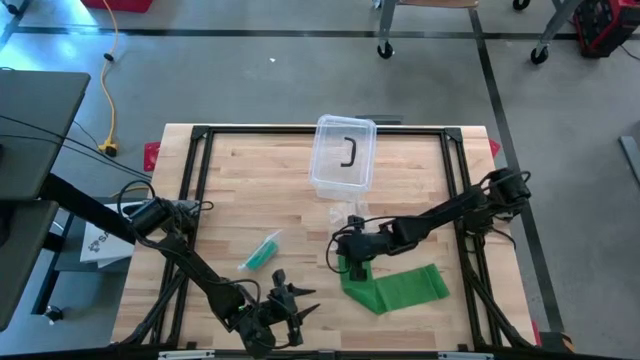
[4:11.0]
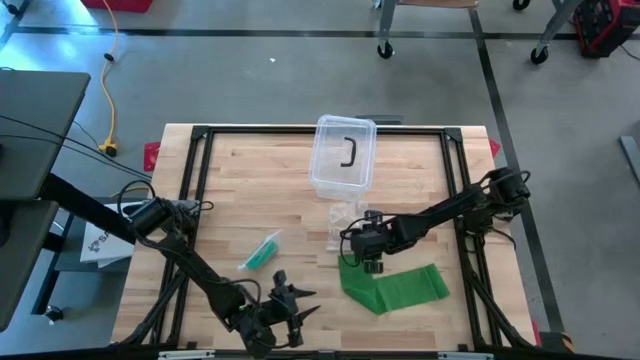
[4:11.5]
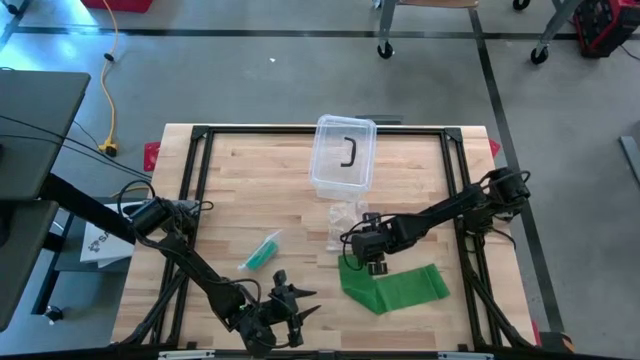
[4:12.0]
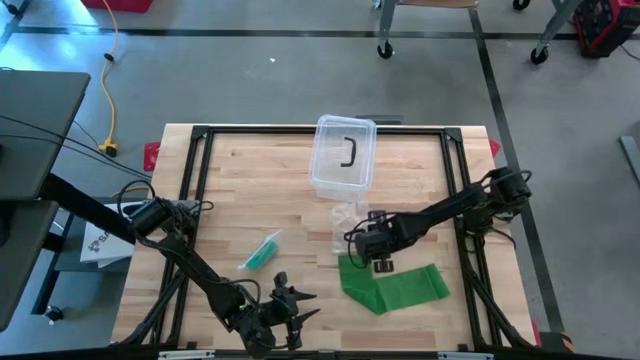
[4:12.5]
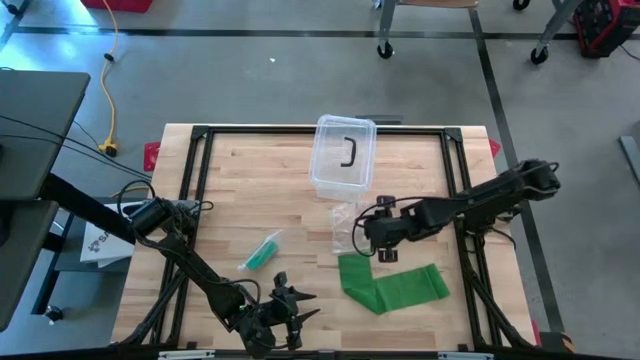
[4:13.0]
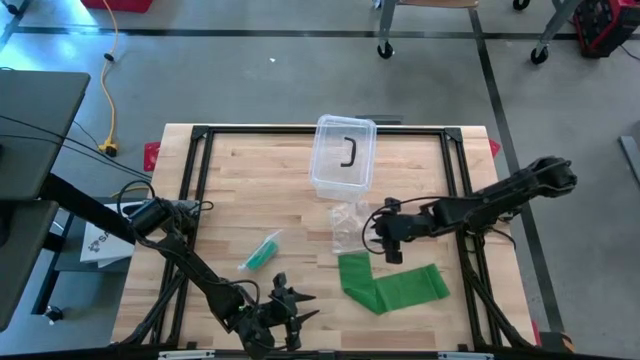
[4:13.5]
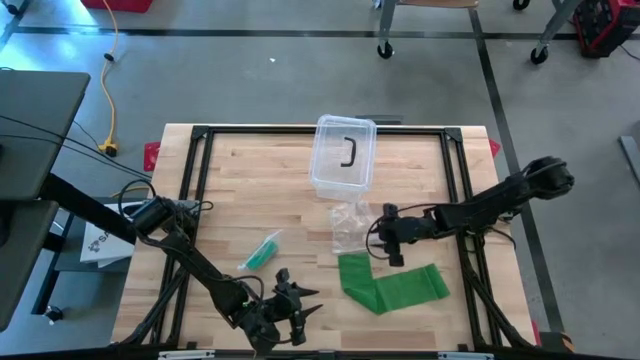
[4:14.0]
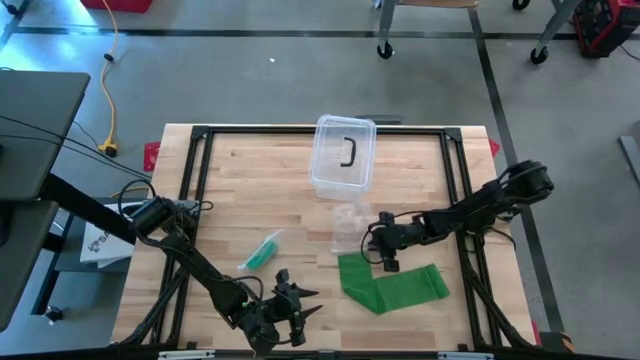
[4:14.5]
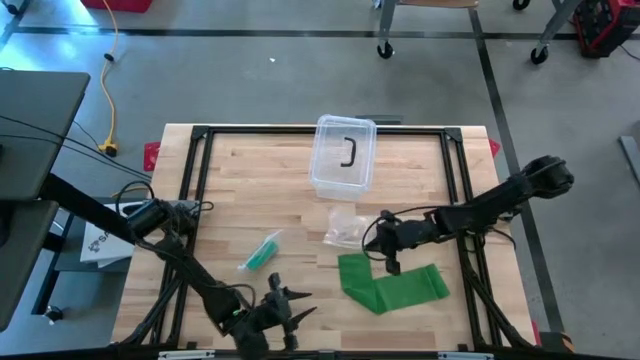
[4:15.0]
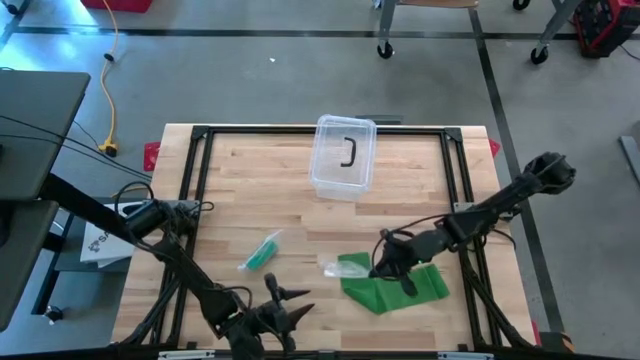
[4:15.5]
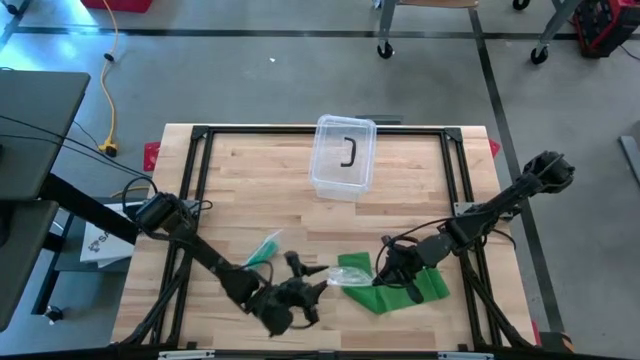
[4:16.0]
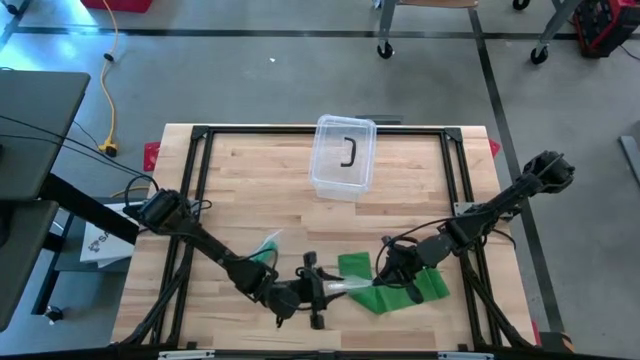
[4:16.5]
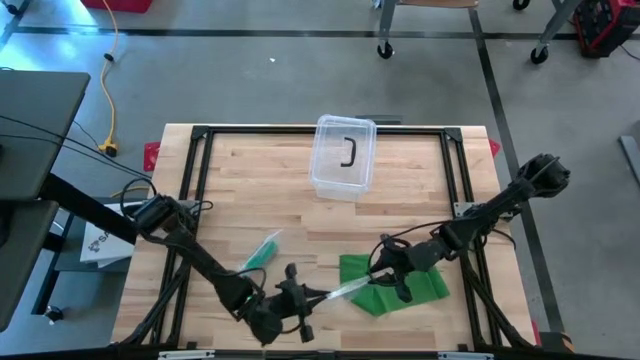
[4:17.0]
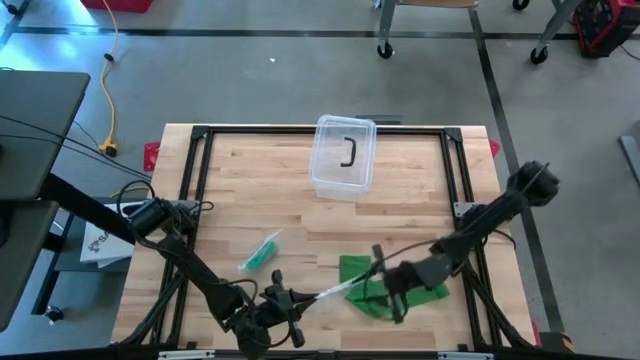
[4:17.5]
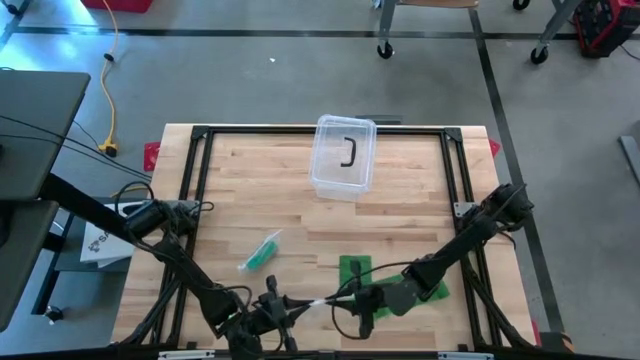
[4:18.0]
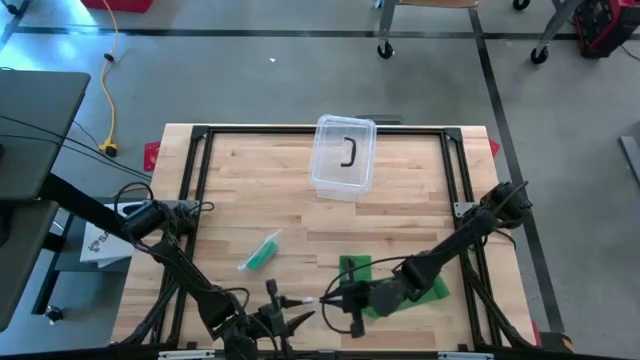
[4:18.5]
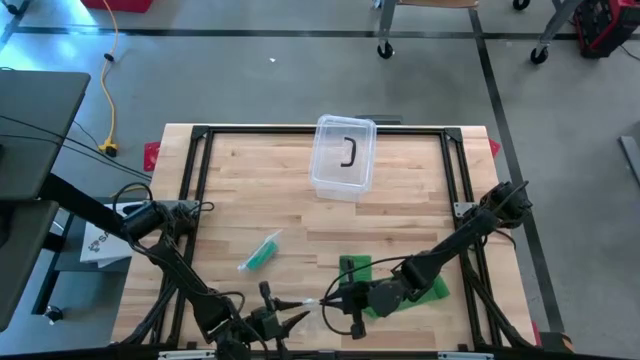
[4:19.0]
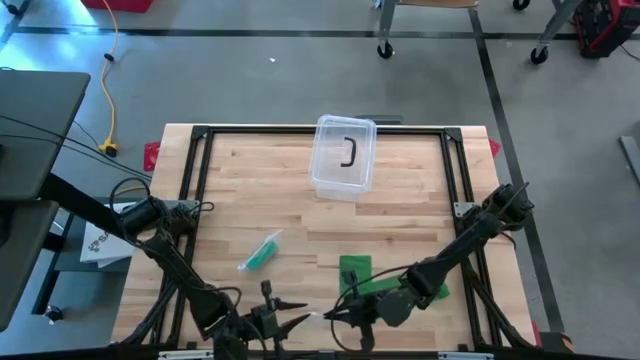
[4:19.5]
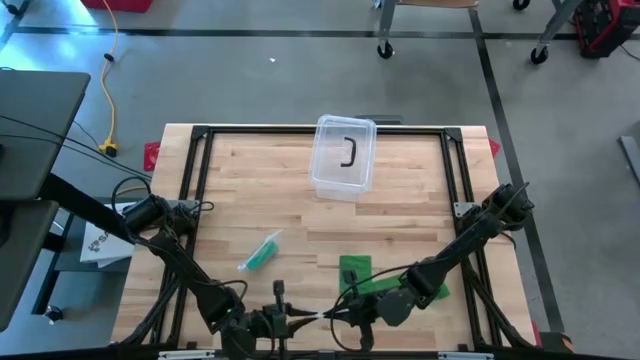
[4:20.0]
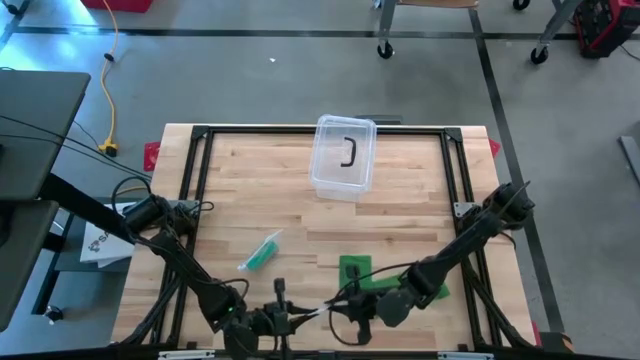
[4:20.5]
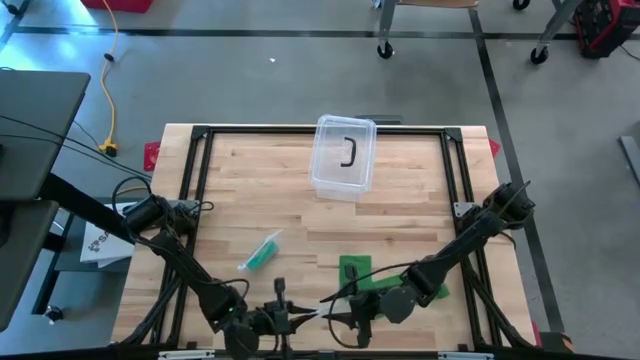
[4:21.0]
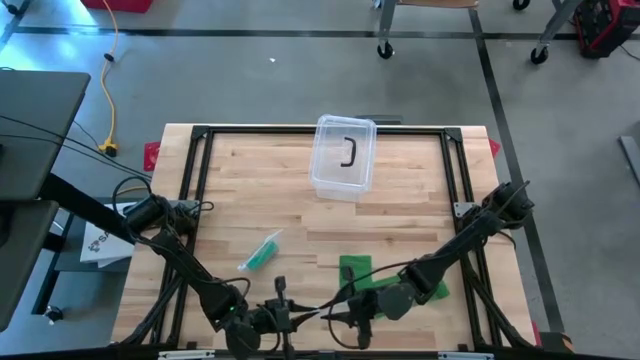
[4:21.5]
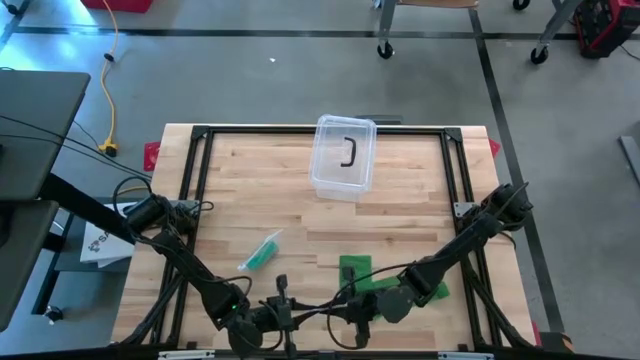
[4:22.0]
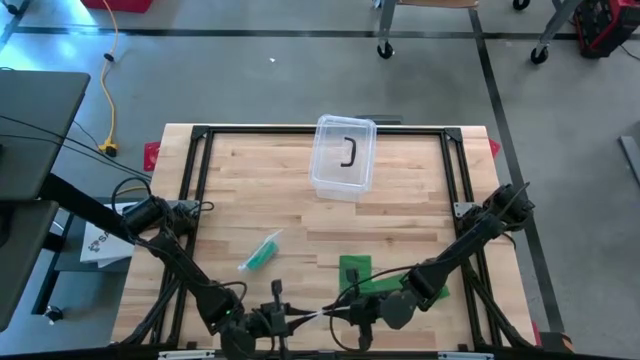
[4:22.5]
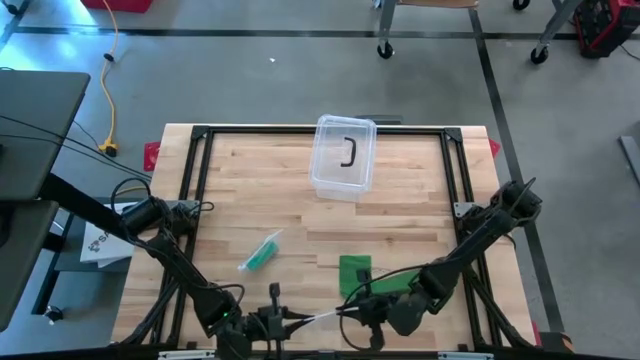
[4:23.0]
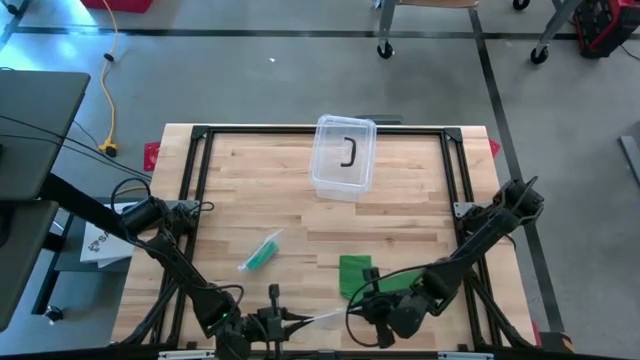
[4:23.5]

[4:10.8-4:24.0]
Task: Roll bandage
Open the transparent zip bag
